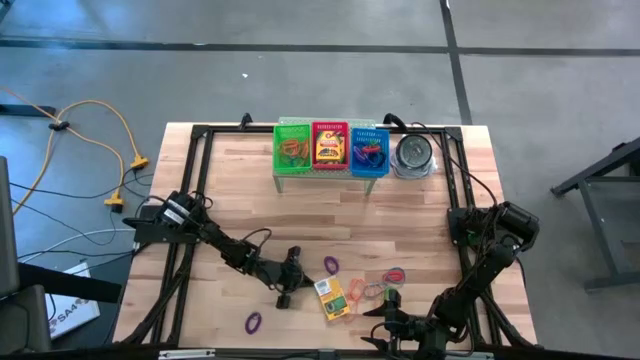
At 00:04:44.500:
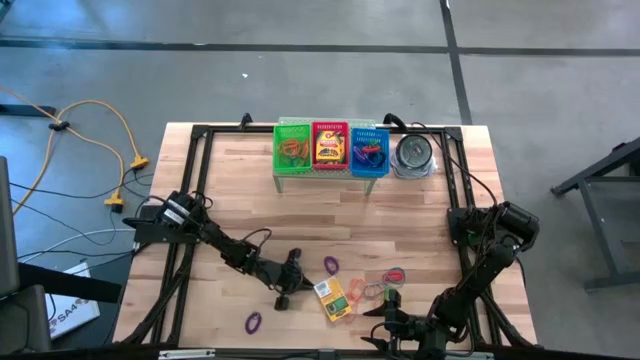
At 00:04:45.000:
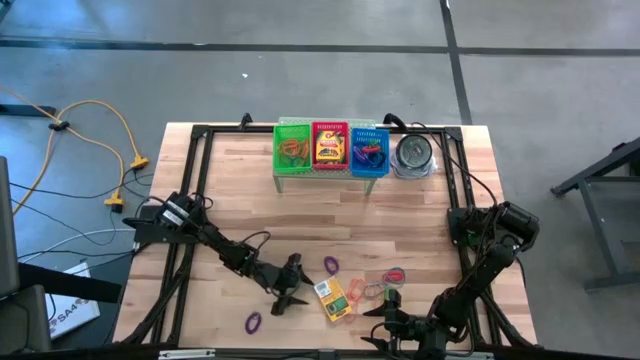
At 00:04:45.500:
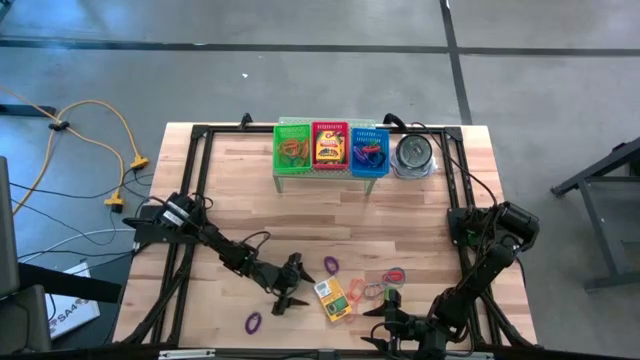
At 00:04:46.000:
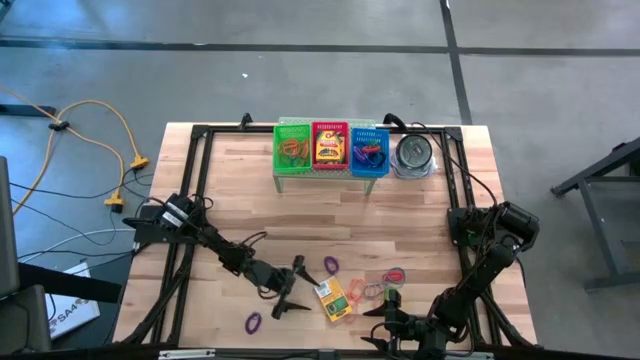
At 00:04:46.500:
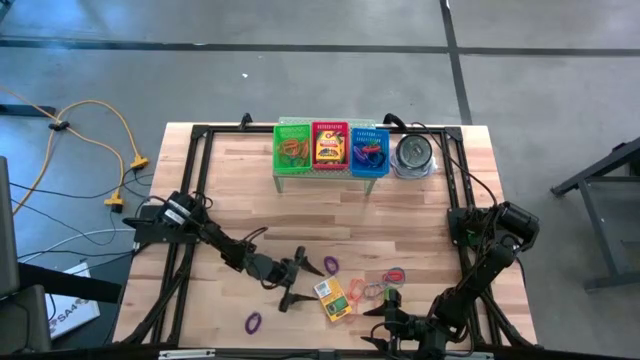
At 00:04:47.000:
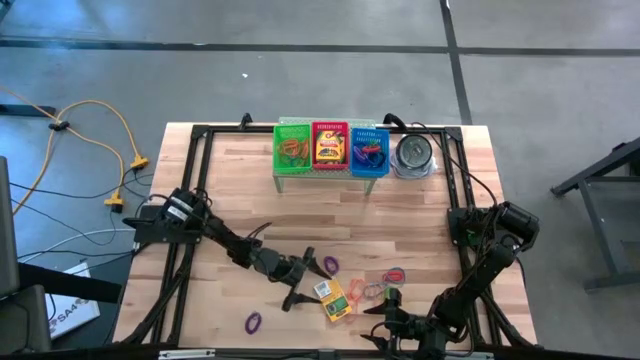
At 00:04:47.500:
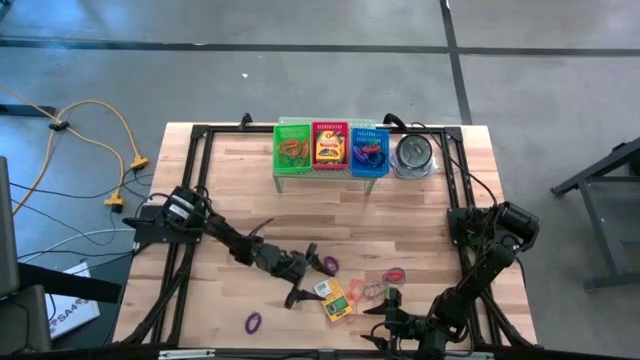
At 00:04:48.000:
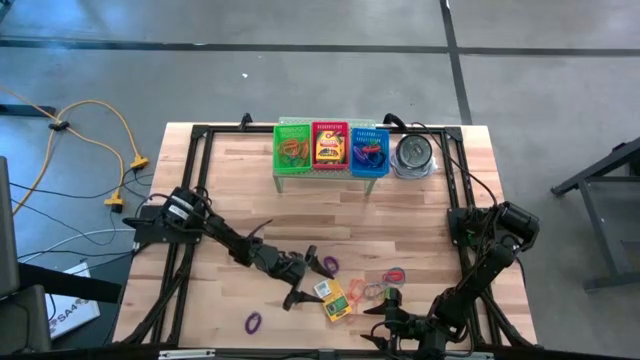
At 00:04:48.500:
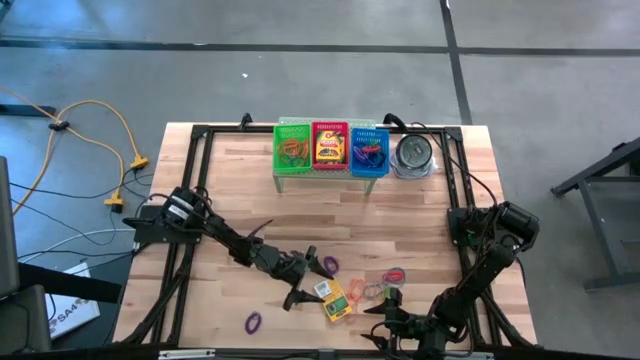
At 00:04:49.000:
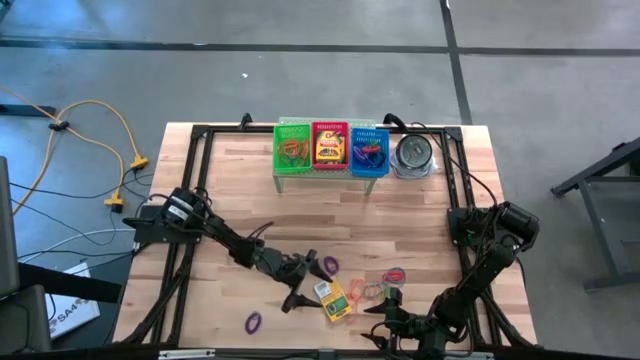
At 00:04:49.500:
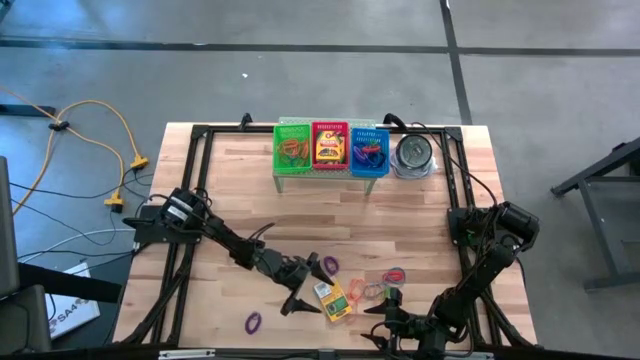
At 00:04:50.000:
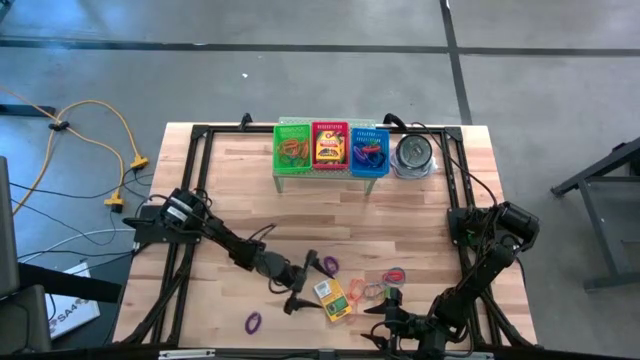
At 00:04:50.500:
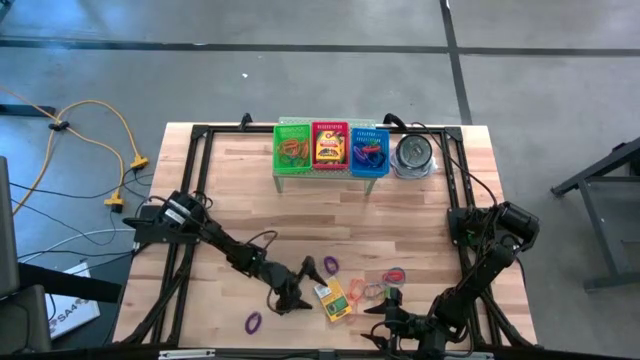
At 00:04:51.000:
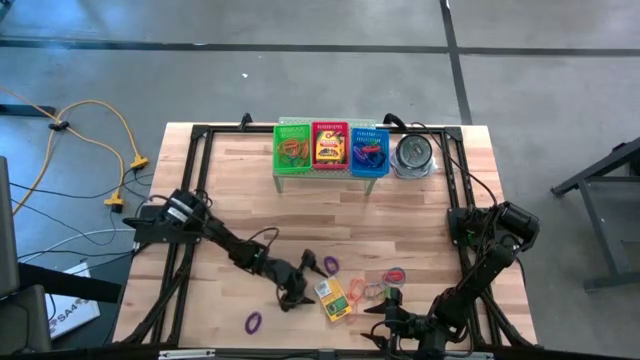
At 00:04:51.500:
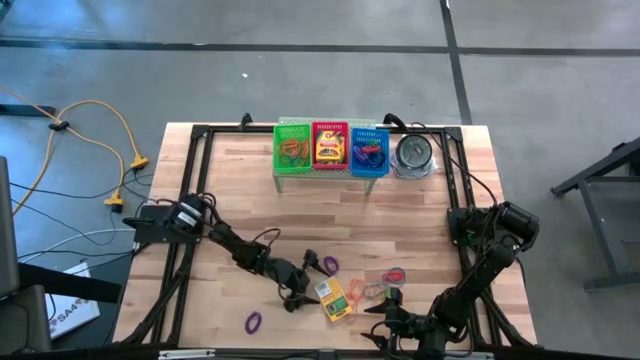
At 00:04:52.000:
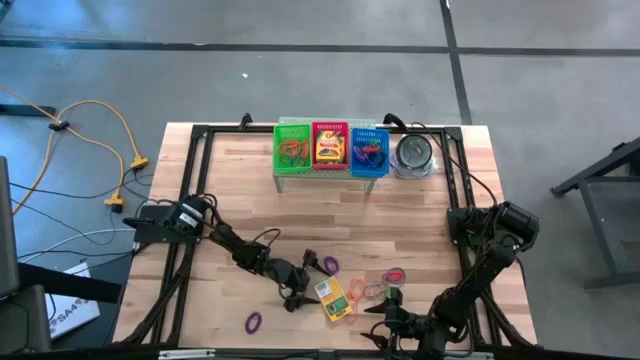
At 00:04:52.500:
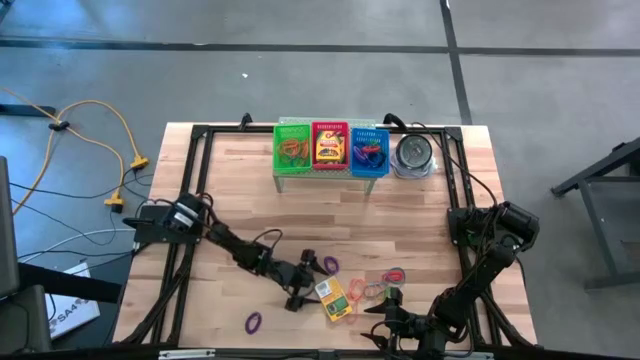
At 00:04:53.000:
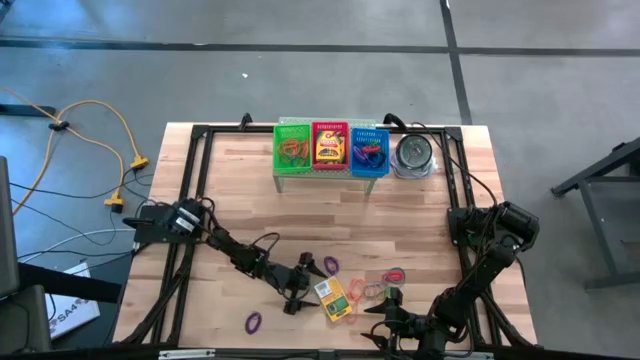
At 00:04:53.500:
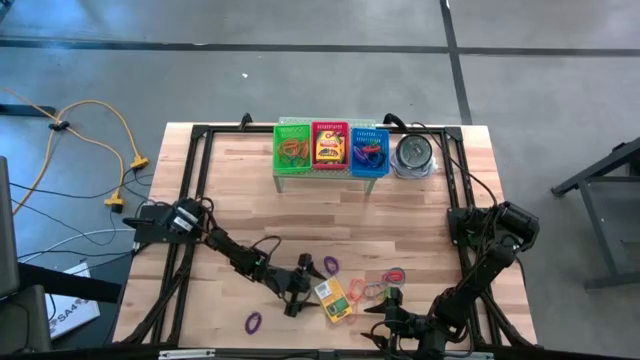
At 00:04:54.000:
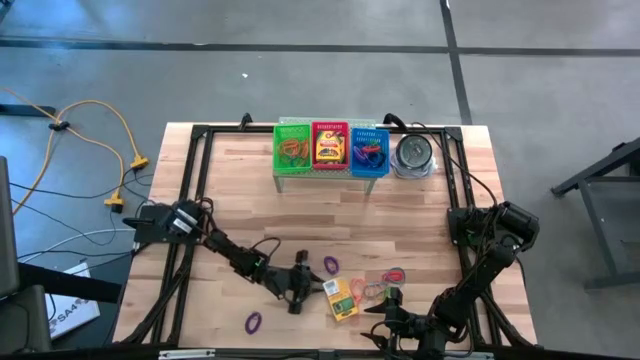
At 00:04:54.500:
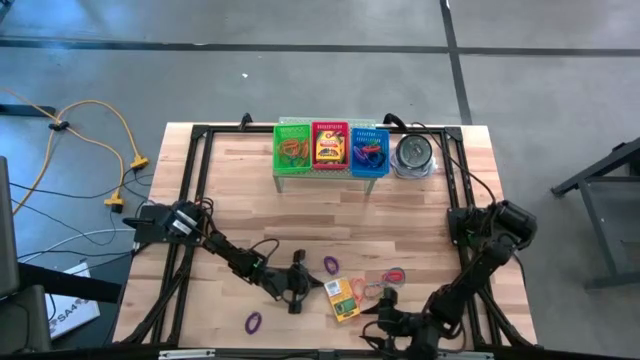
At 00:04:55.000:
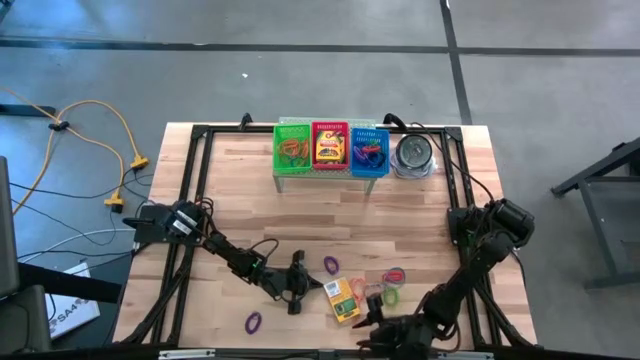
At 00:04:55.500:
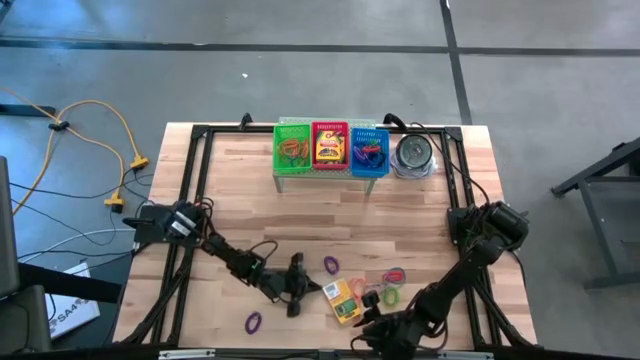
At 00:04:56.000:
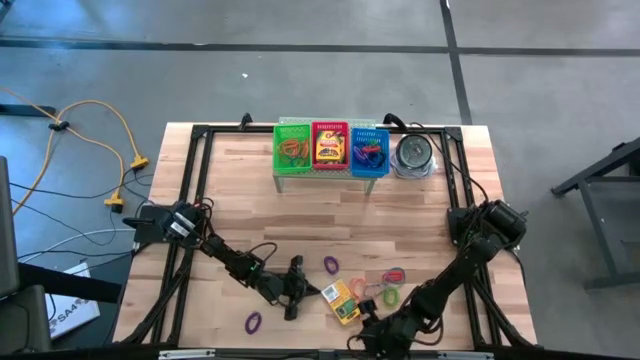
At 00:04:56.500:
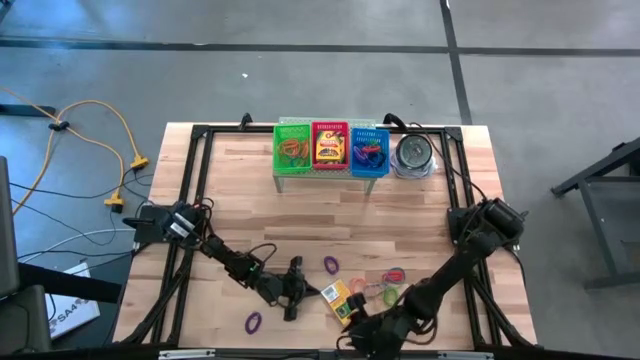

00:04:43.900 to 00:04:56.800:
Task: Pick & Place Office Desk Supplies
Put the yellow crayon box into the red bin on the shelf
